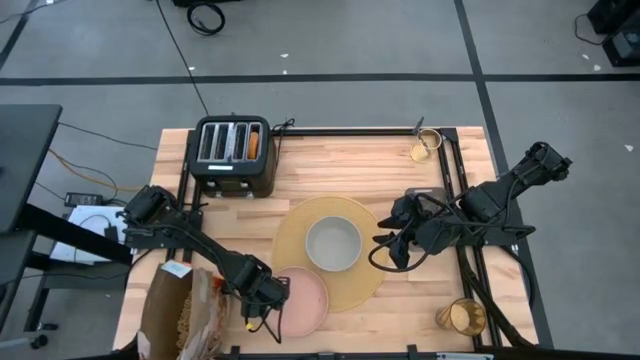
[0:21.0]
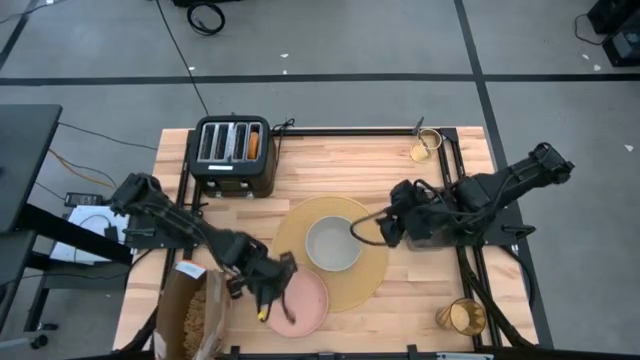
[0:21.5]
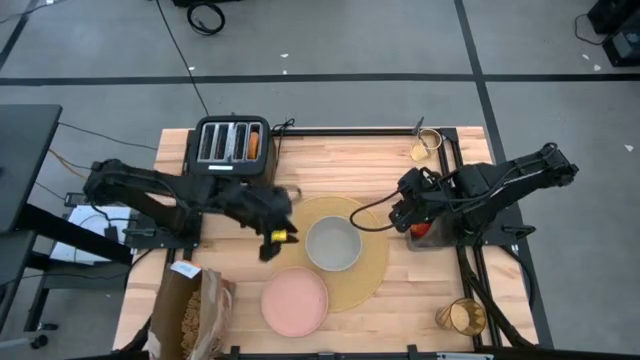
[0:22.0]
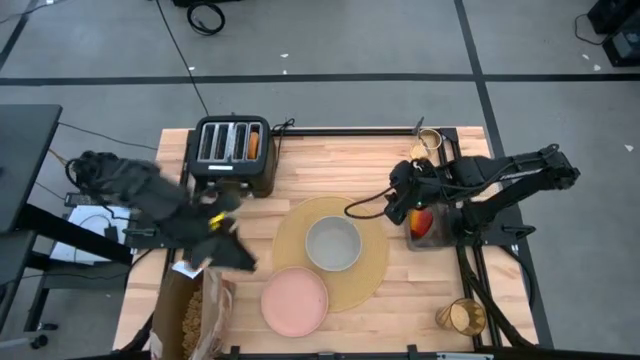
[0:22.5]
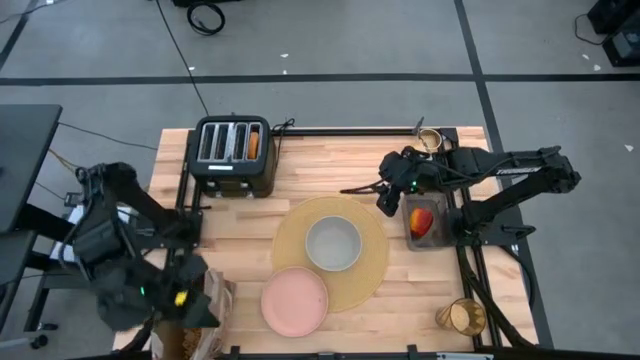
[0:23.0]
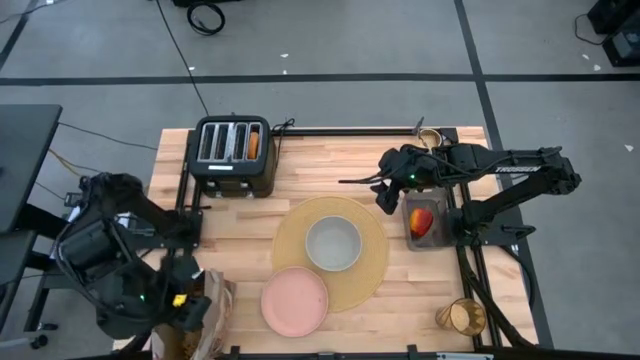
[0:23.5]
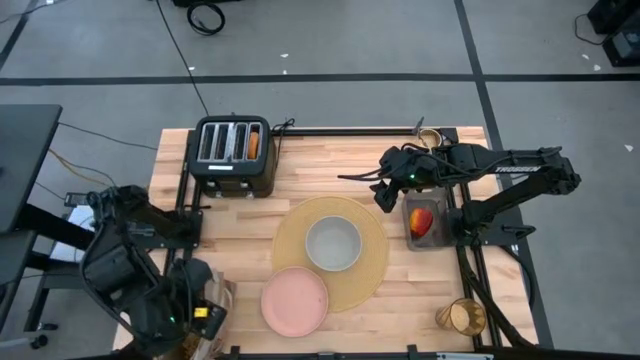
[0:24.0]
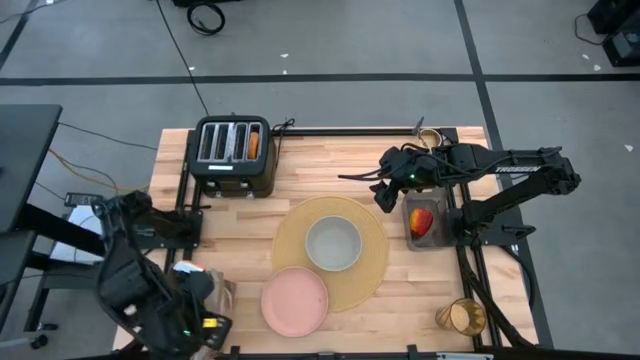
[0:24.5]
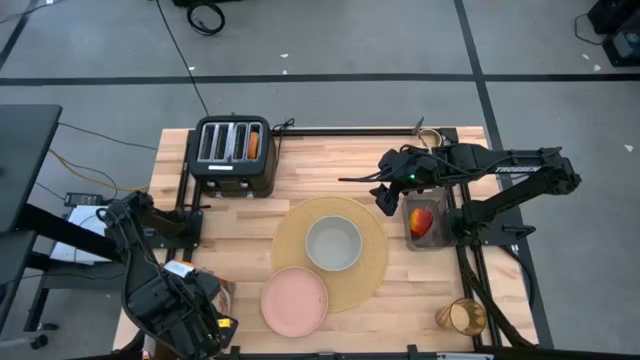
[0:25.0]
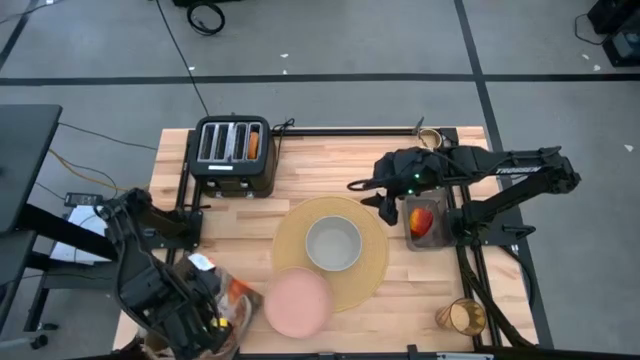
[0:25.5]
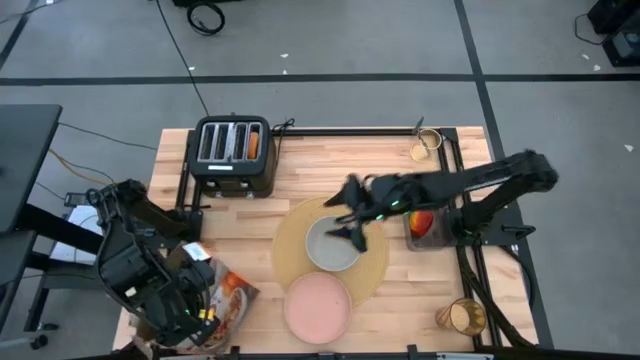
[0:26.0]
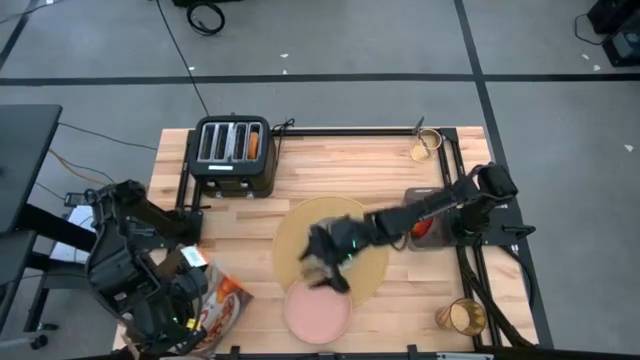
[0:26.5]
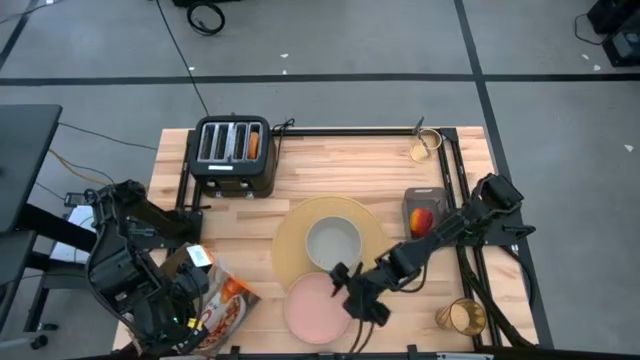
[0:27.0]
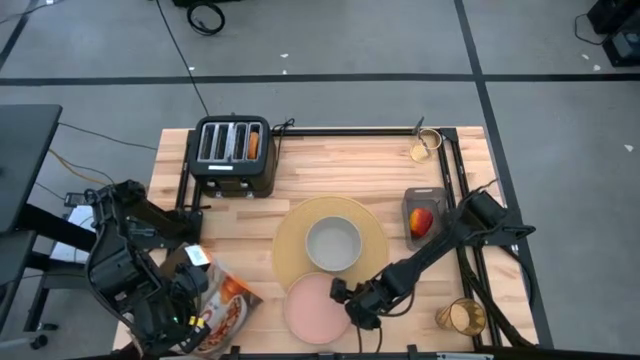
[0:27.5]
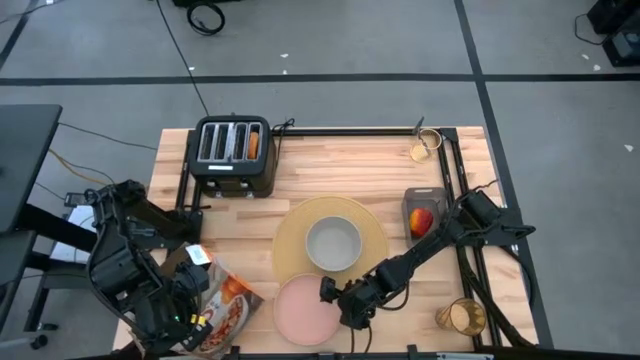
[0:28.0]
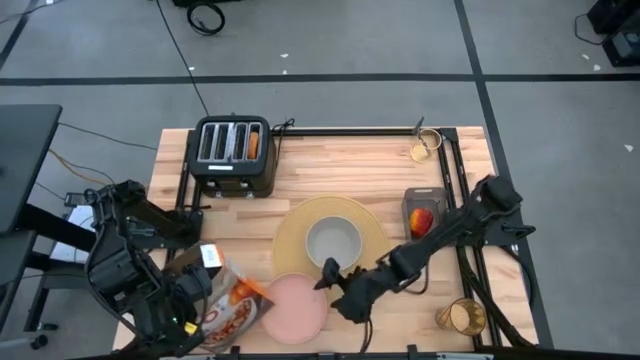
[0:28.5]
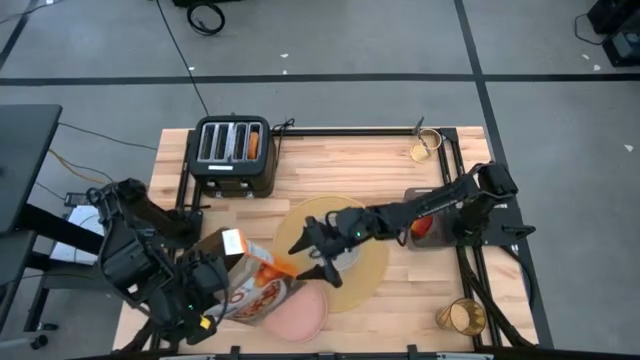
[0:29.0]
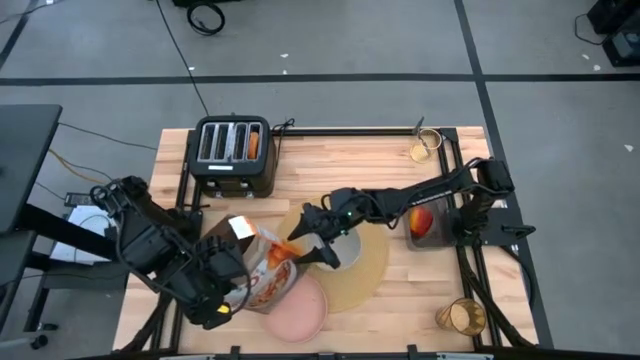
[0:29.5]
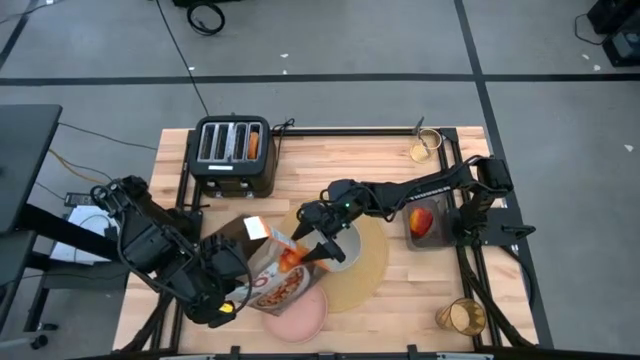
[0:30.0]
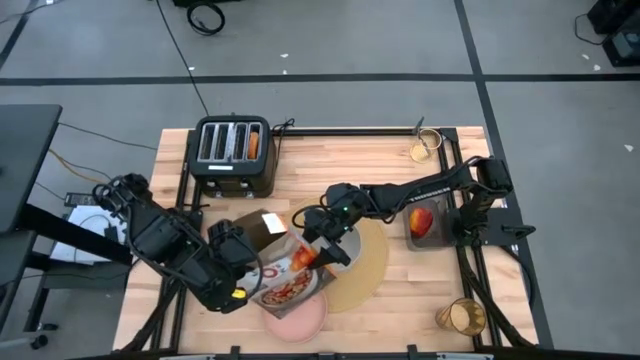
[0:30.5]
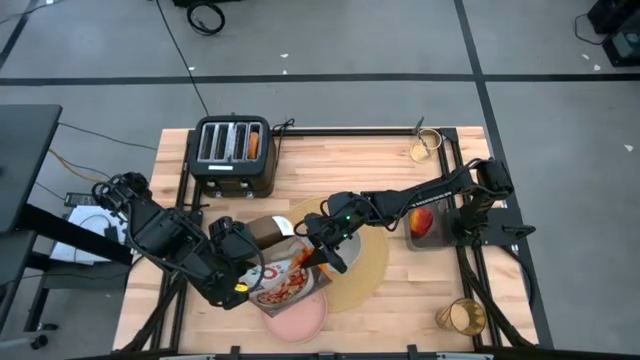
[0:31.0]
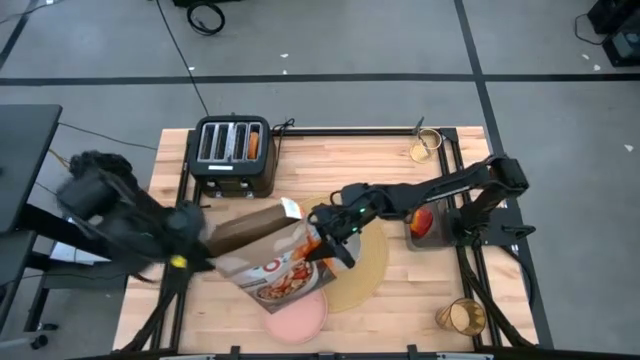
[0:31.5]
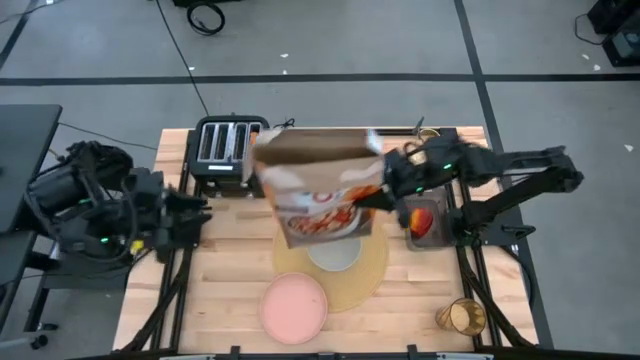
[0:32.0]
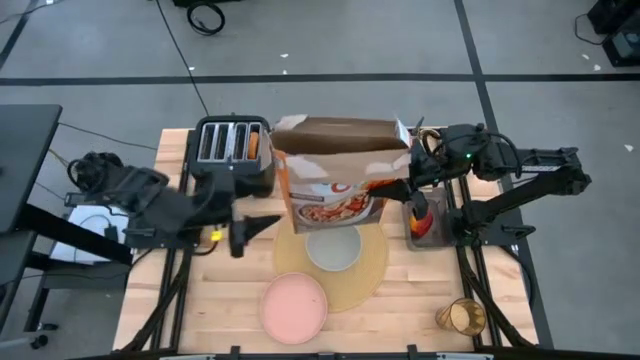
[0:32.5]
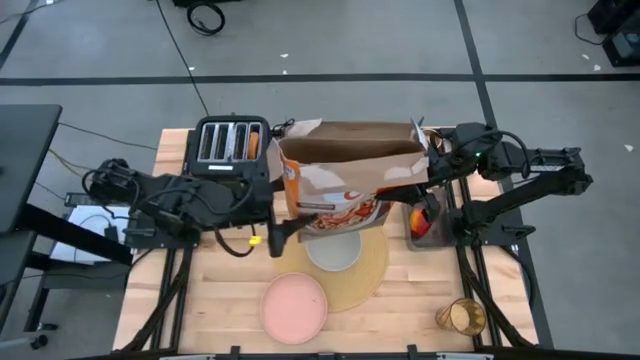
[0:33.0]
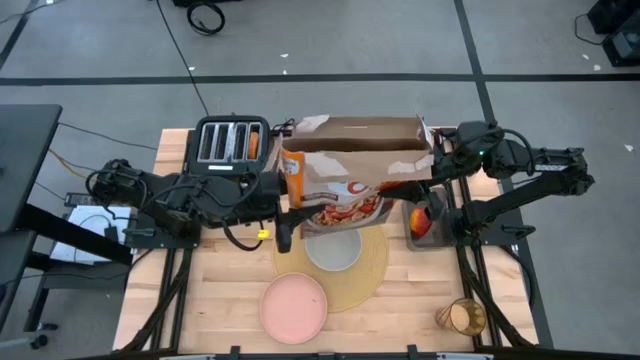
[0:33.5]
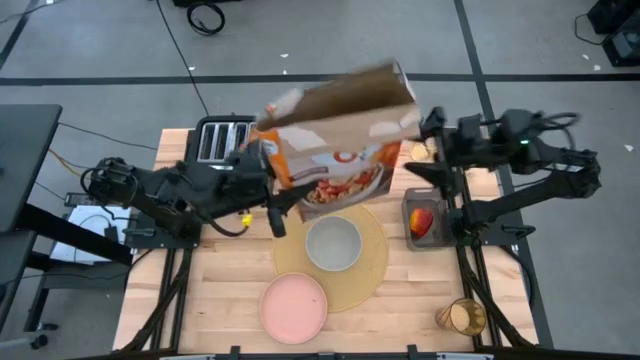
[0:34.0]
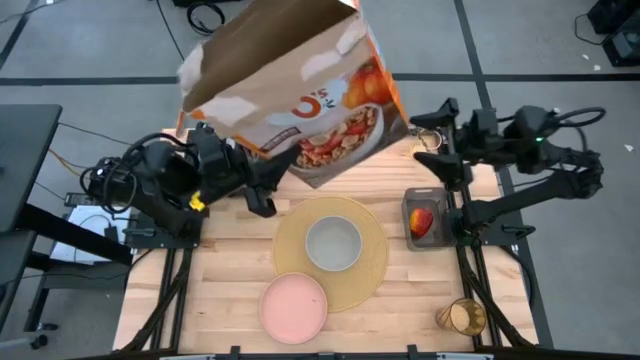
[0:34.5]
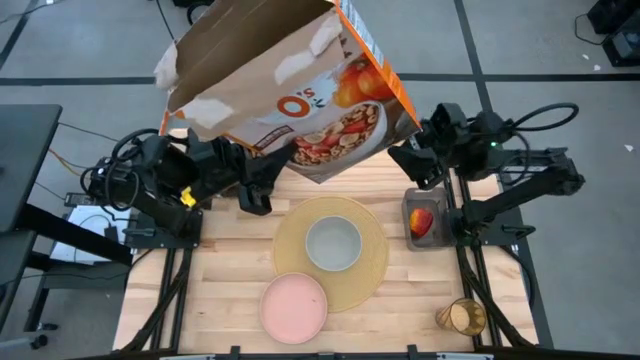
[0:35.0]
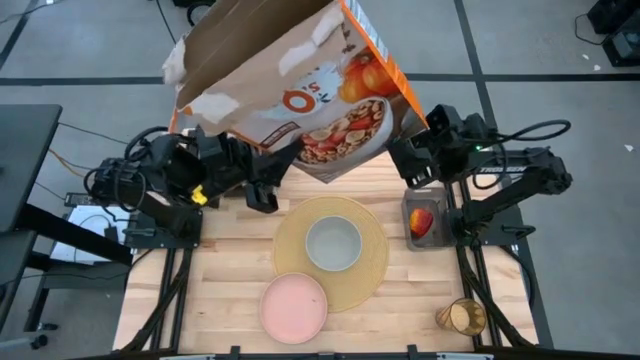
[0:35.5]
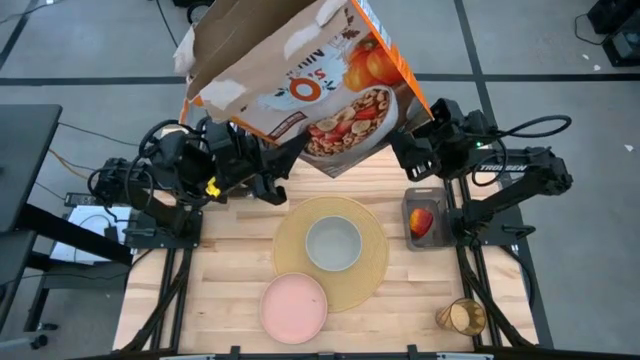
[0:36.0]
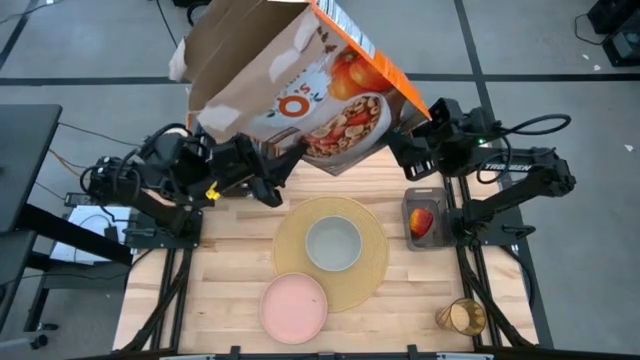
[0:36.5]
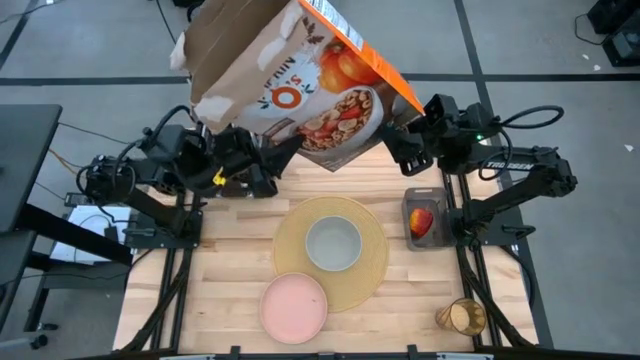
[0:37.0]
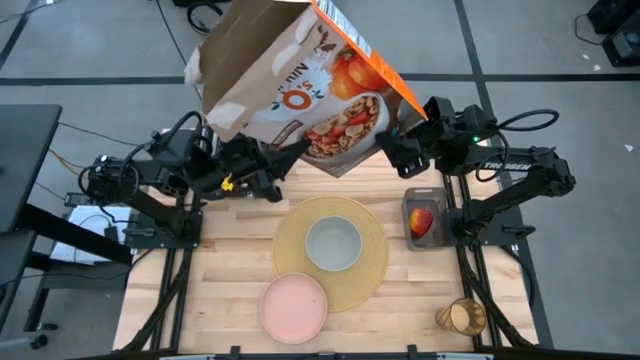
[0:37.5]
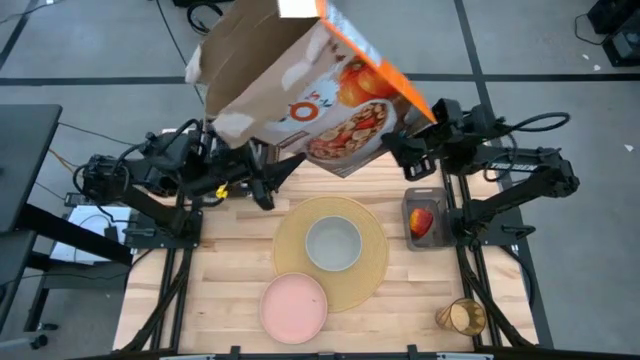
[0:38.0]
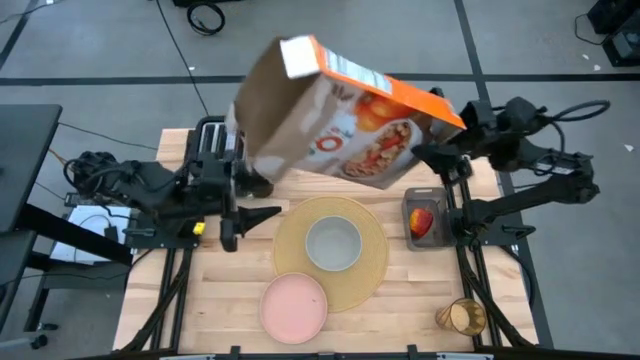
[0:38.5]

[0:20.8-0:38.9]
Task: Arrange a breakfast setting
Pour the cereal from the orange cereal box into the gray bowl

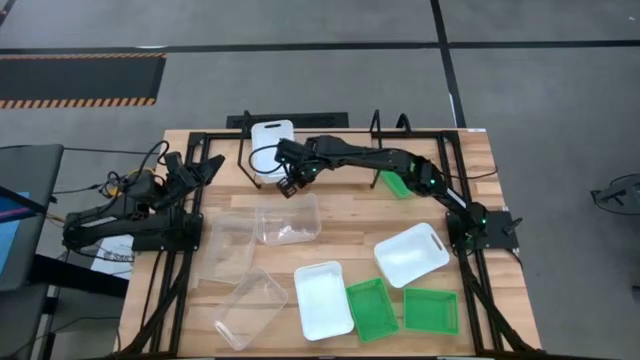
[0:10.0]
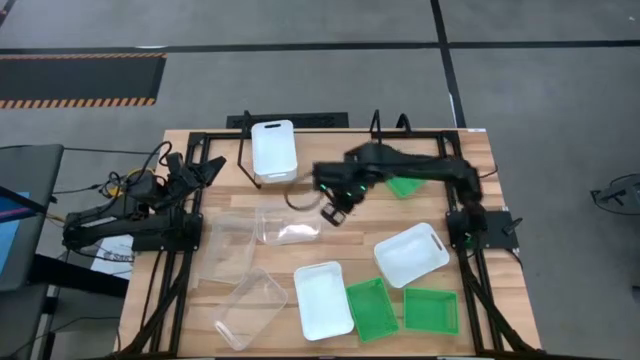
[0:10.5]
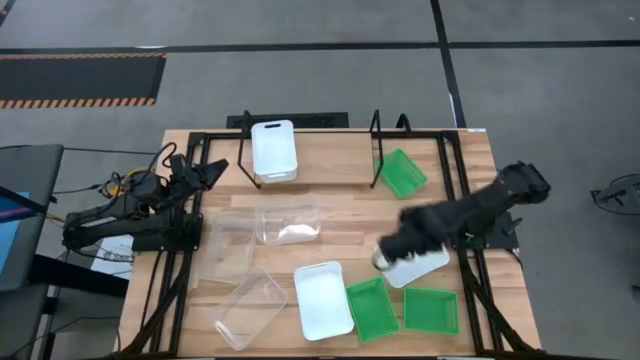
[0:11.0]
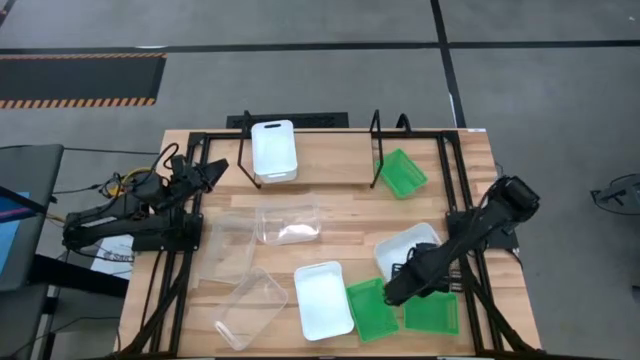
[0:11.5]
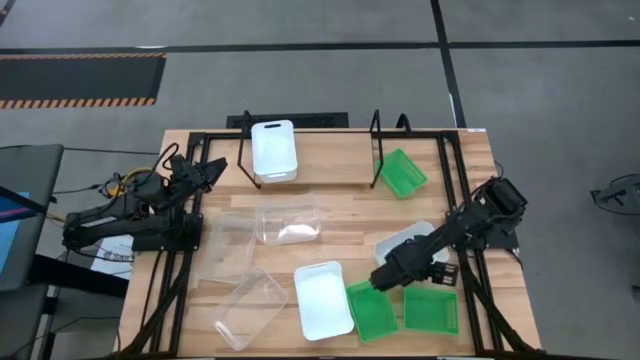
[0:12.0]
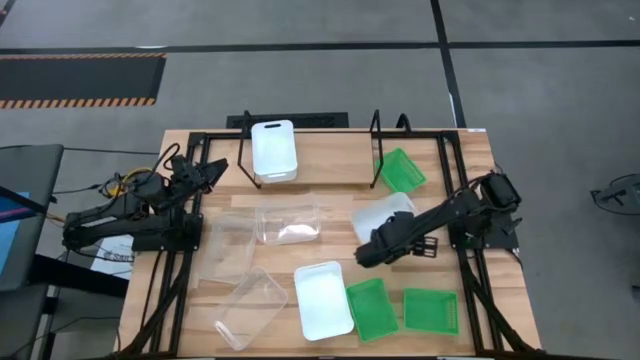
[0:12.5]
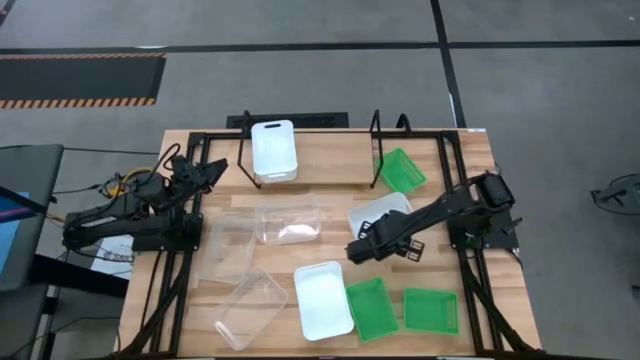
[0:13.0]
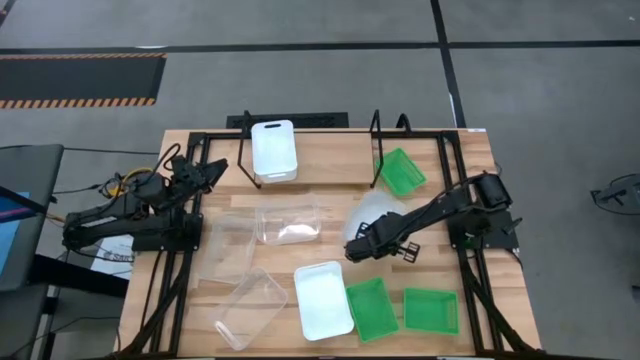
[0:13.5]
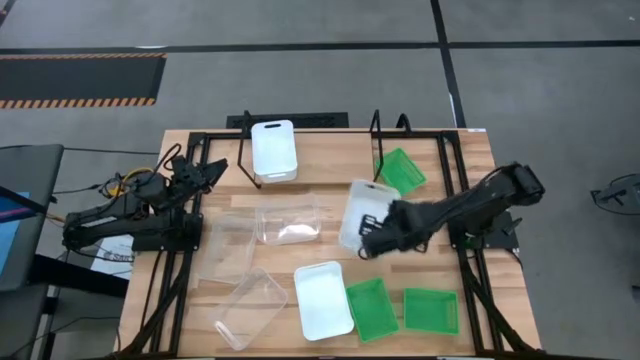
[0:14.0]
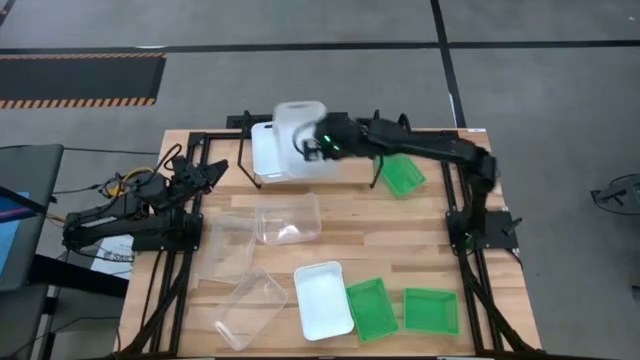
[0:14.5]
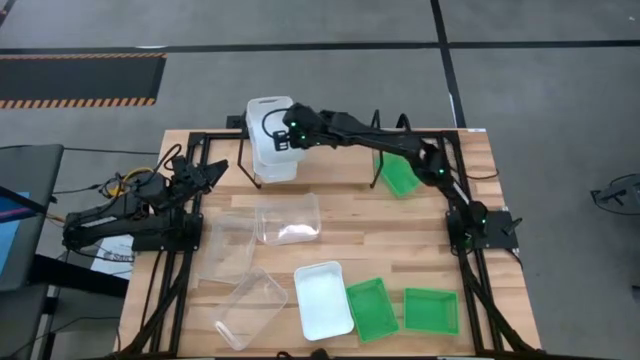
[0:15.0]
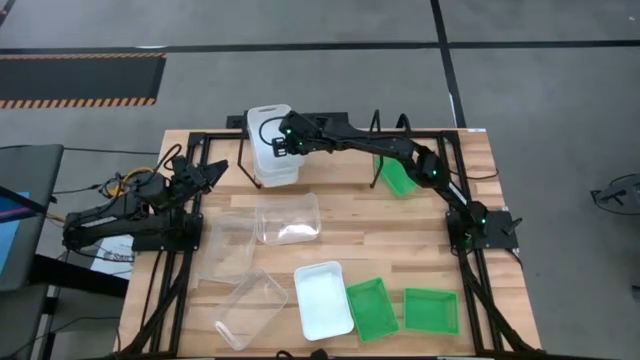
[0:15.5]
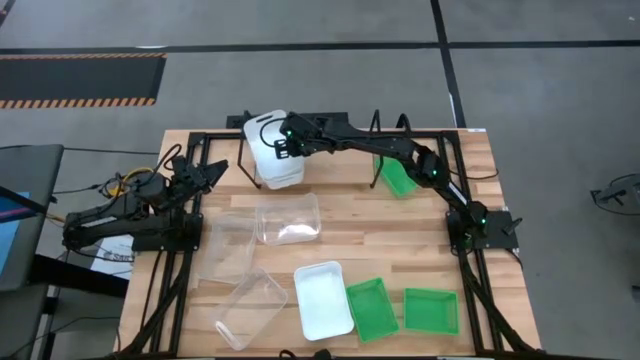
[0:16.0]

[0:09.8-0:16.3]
Task: Stack baskets on shelf by color
Stack the right white bin on top of the white bin on the shelf
